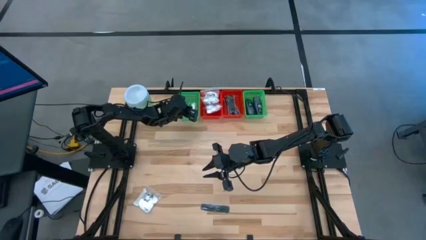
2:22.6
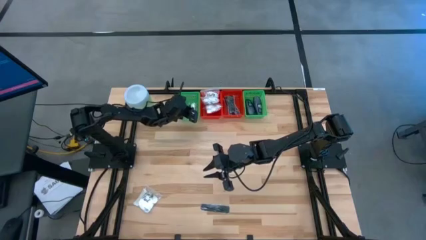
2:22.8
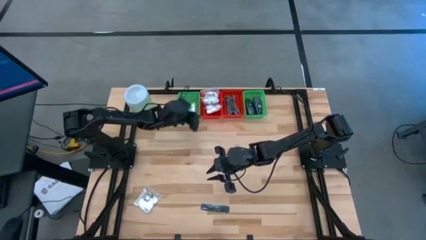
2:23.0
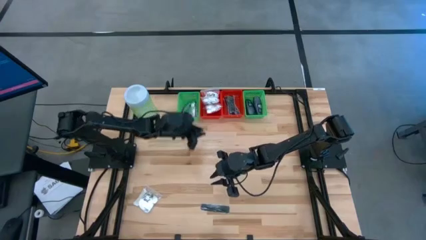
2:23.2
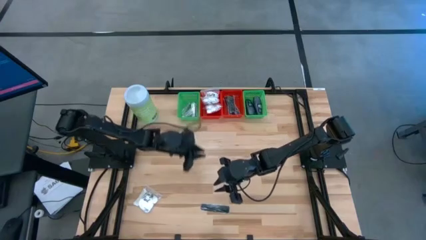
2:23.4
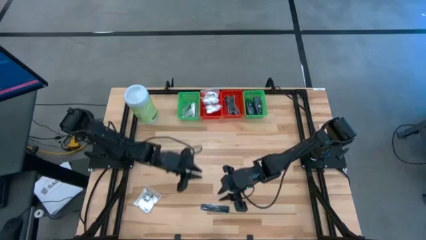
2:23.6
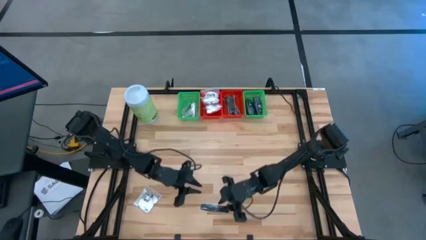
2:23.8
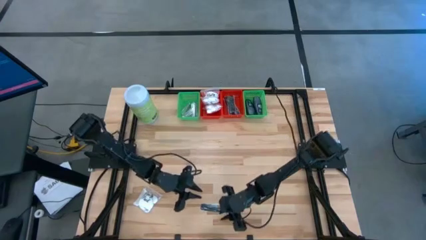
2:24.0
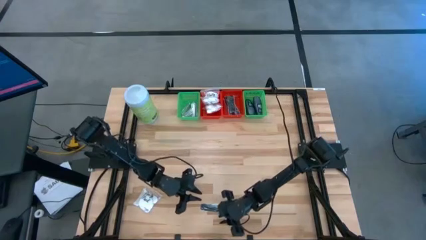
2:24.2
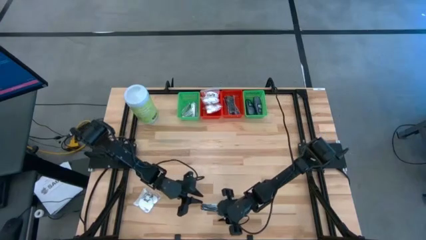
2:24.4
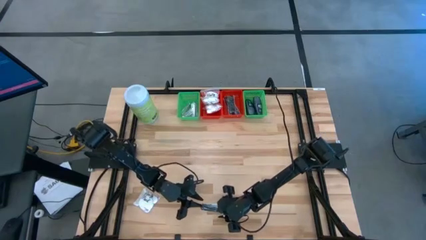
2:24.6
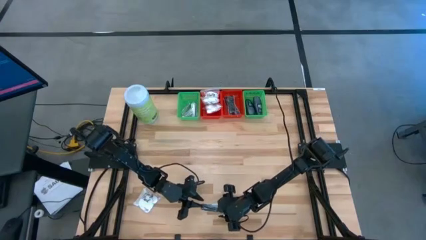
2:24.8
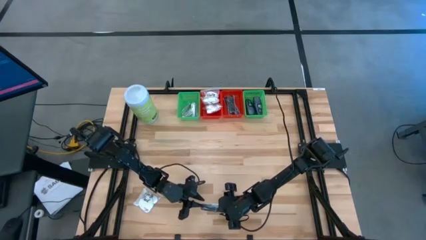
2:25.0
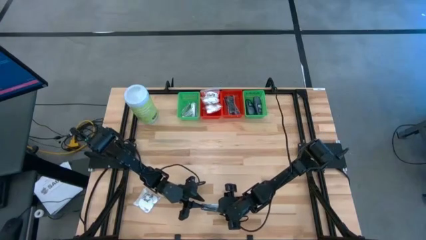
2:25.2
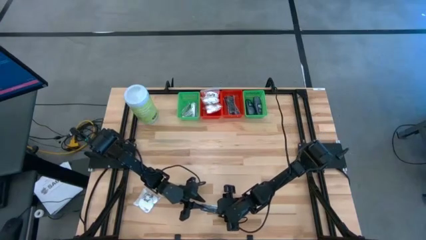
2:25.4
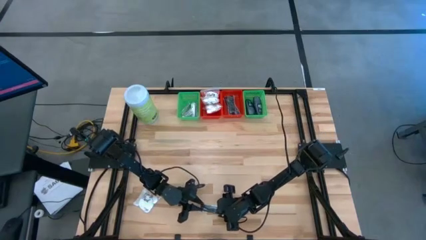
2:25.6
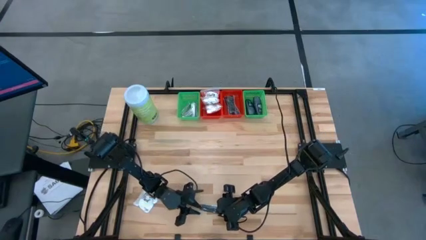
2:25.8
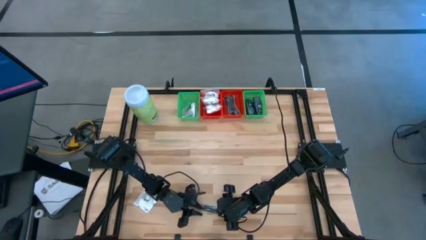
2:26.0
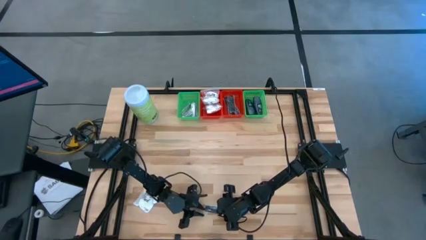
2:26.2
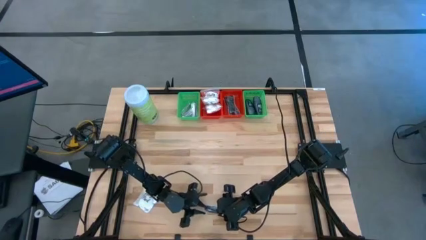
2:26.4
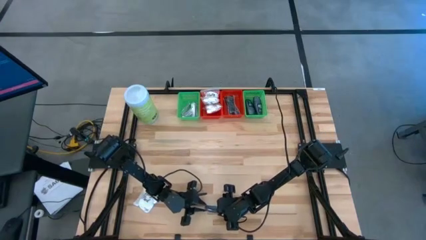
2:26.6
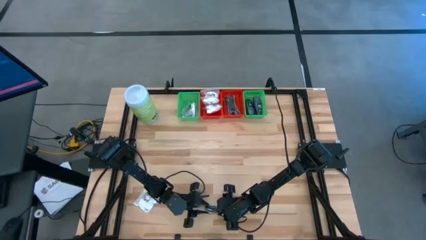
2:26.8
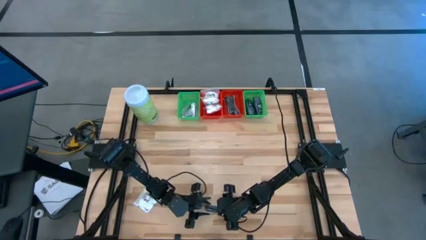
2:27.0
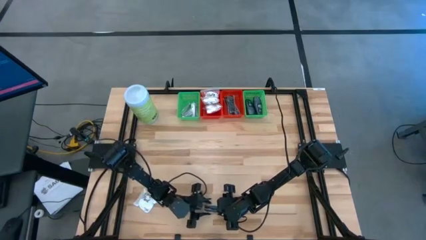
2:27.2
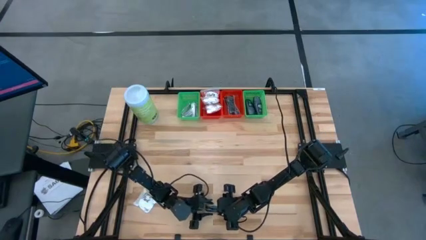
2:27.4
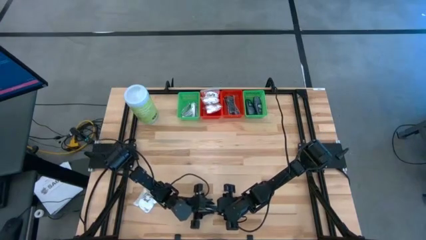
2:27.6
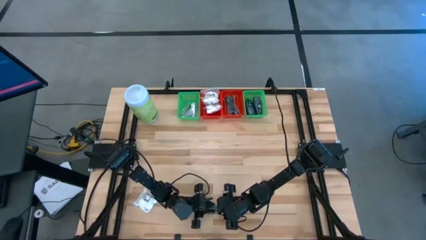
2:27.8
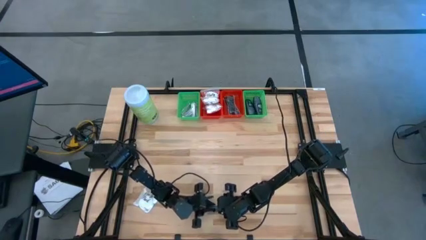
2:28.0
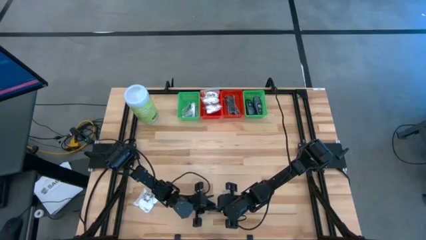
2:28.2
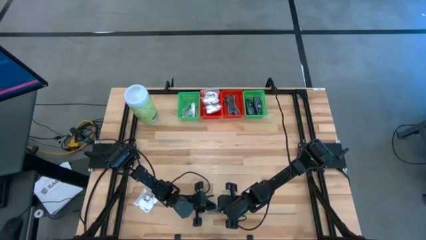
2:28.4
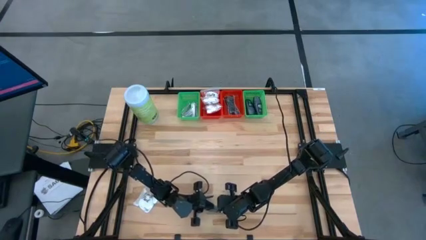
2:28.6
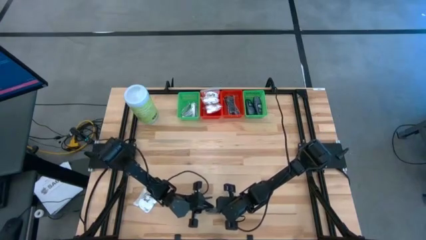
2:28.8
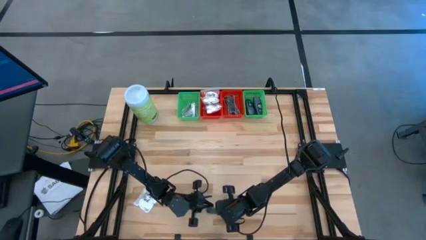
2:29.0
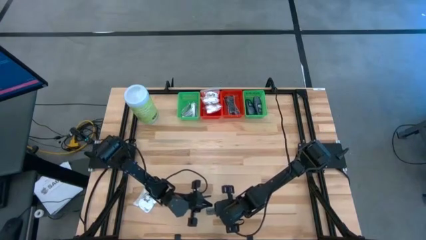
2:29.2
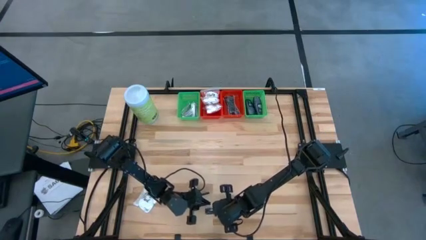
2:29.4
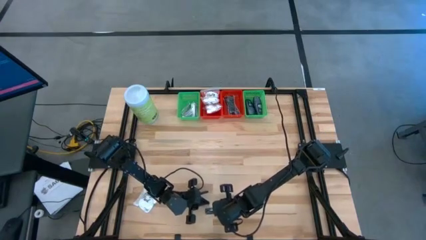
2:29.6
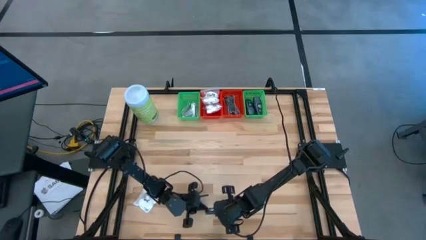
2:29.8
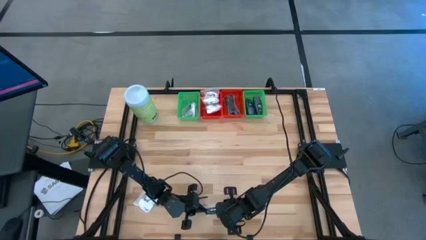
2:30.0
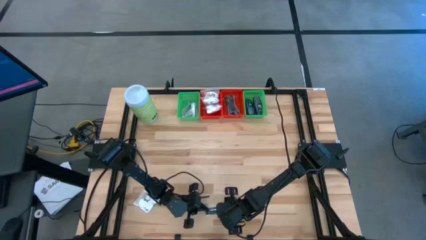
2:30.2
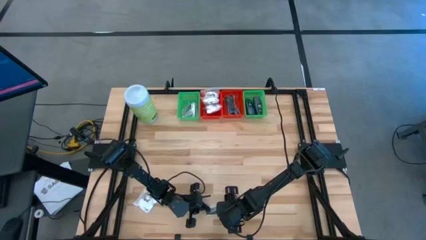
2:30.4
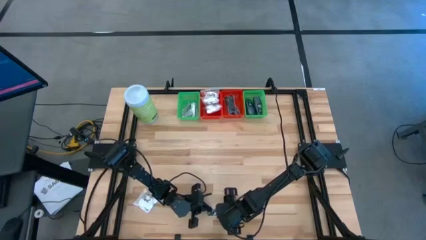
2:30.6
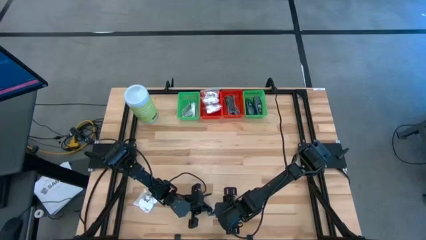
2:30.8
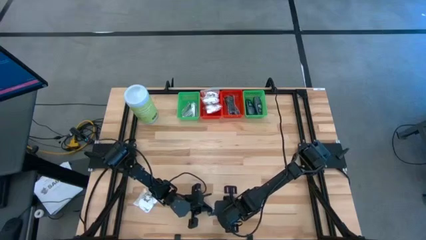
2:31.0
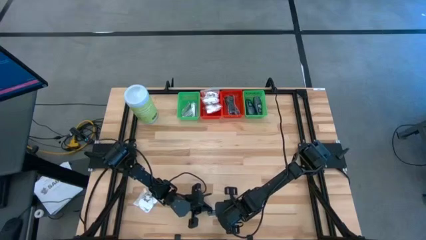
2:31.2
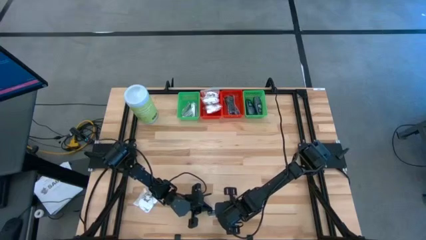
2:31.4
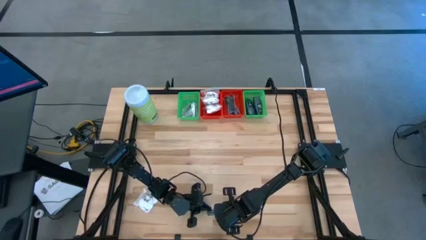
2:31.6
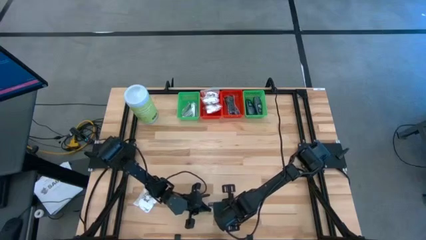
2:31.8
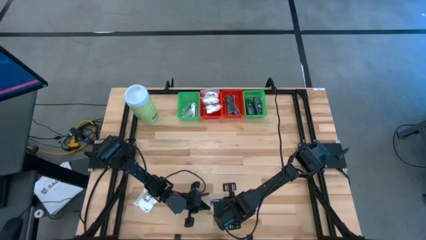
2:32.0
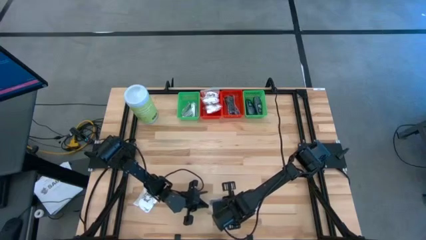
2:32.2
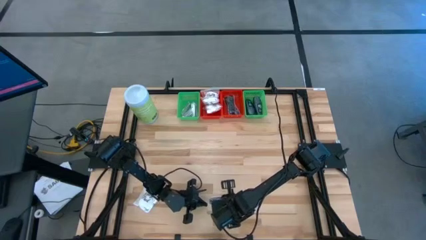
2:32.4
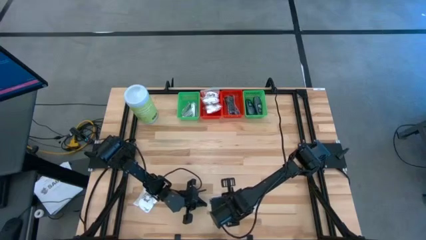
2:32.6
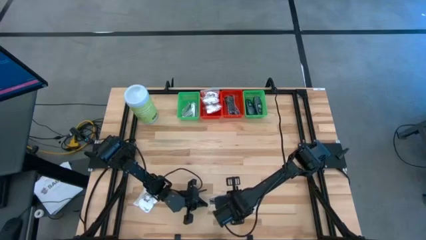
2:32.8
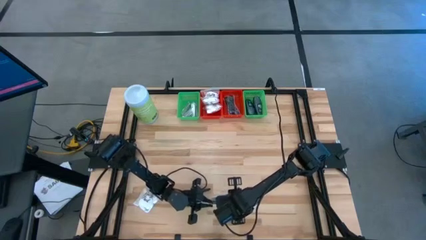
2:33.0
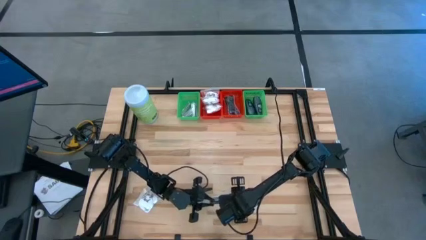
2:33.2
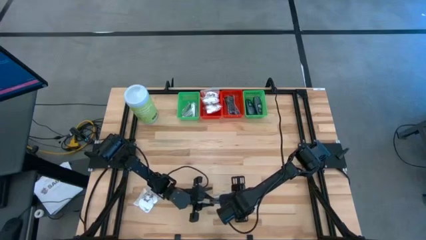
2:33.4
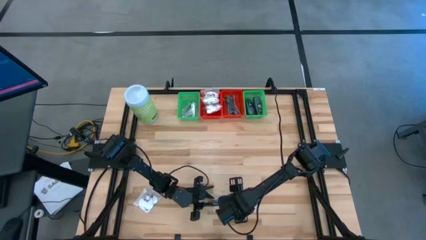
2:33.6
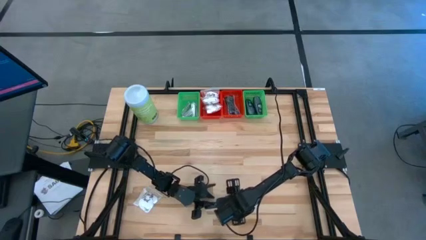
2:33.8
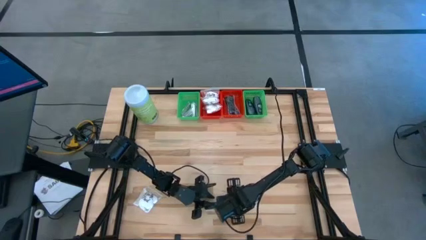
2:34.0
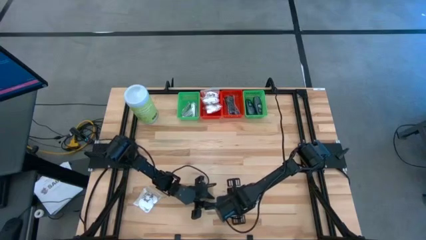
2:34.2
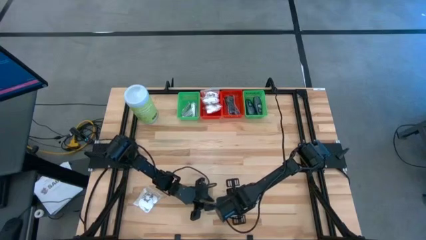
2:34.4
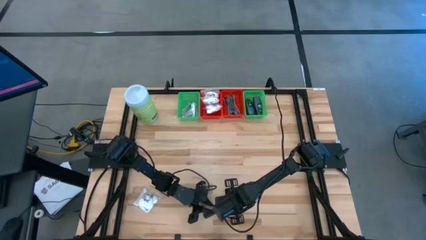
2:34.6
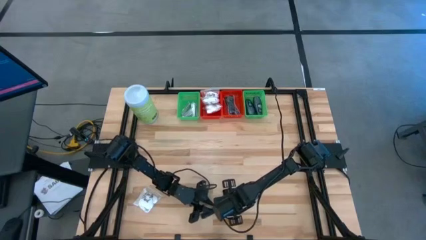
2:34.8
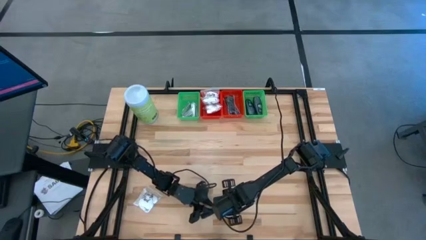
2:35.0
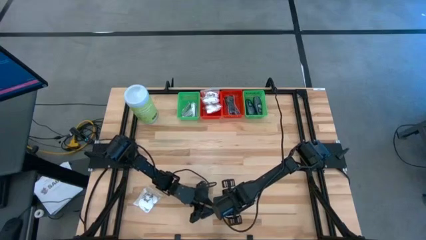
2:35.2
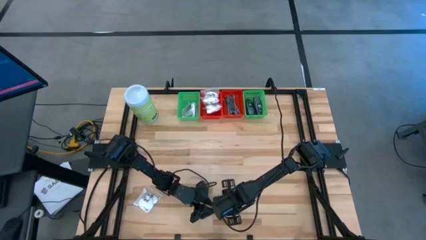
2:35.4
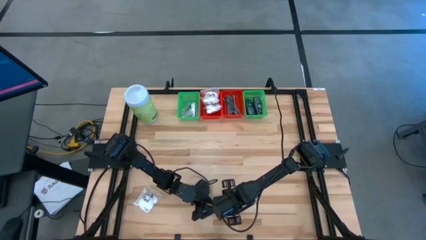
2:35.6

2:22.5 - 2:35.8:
Task: Pick & Place Travel size toiletries
Put the black comb into the right red bin
